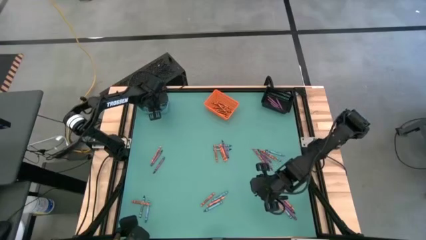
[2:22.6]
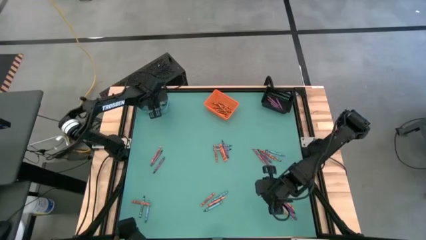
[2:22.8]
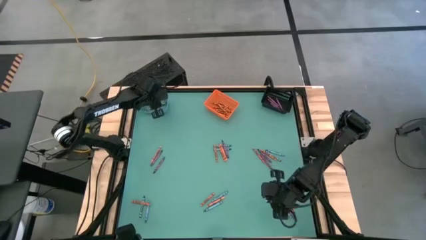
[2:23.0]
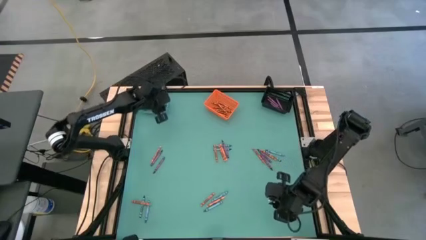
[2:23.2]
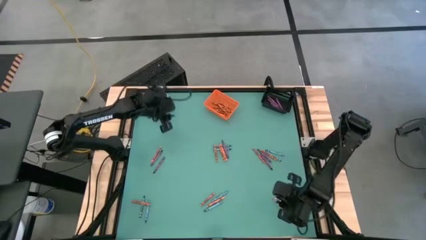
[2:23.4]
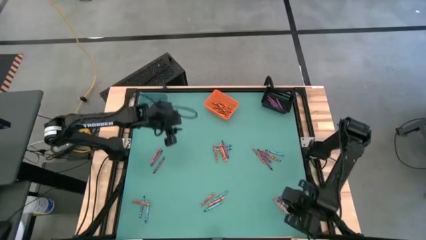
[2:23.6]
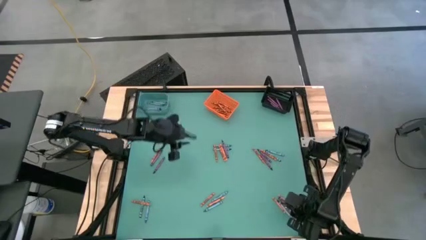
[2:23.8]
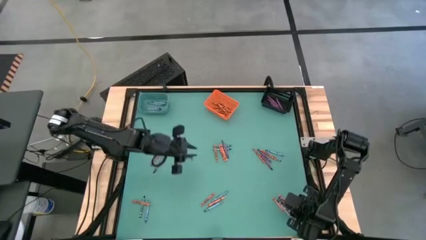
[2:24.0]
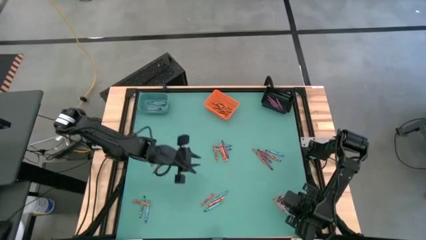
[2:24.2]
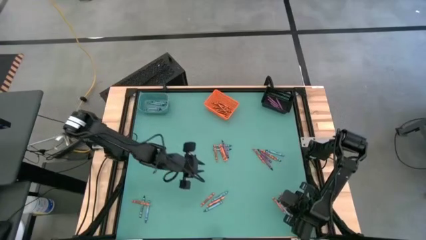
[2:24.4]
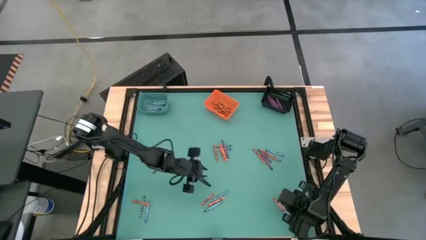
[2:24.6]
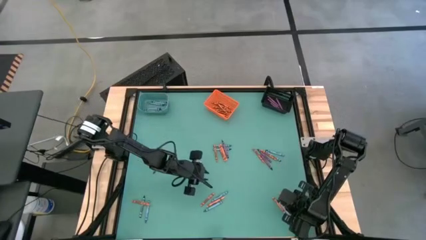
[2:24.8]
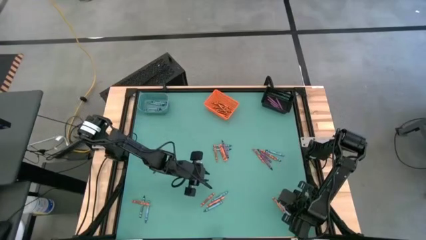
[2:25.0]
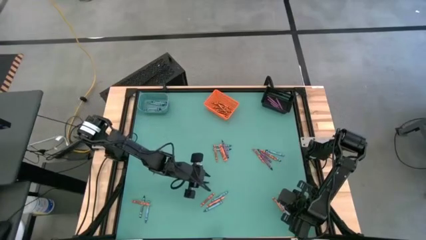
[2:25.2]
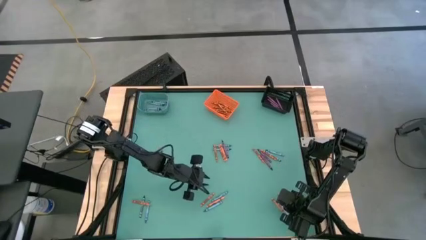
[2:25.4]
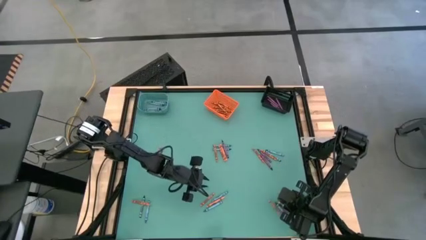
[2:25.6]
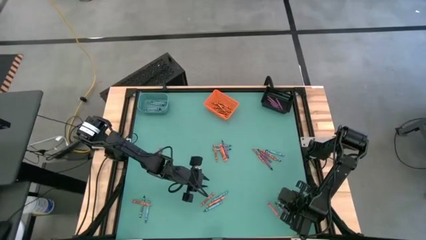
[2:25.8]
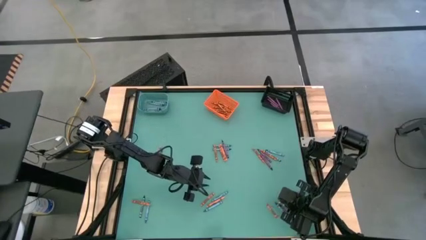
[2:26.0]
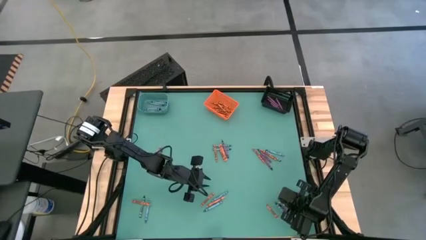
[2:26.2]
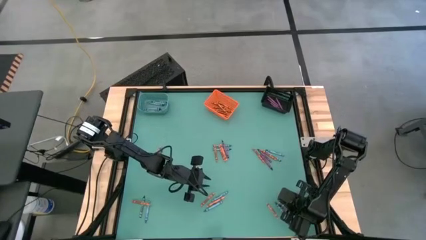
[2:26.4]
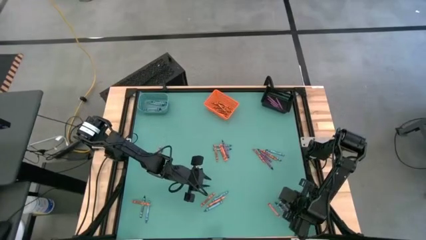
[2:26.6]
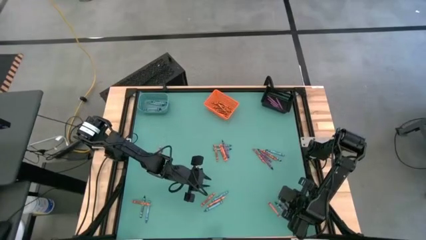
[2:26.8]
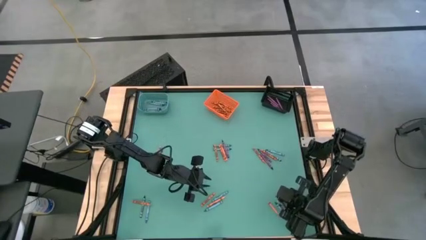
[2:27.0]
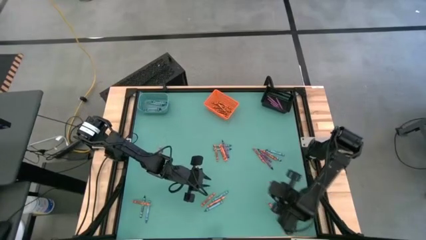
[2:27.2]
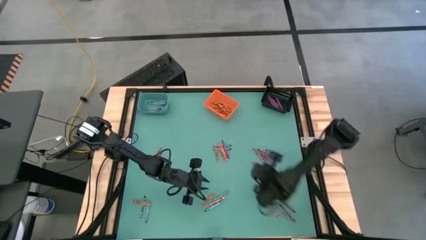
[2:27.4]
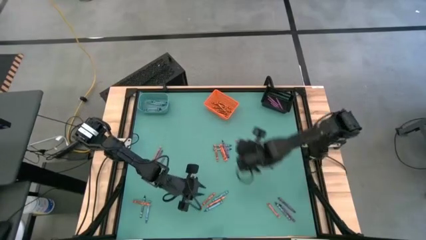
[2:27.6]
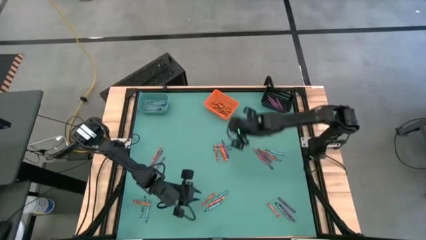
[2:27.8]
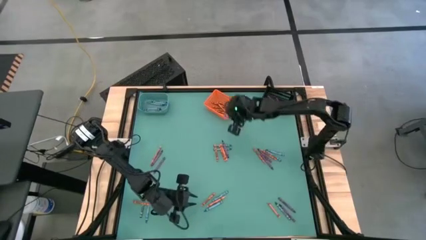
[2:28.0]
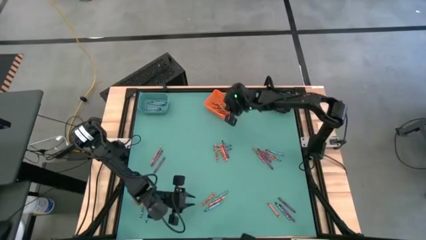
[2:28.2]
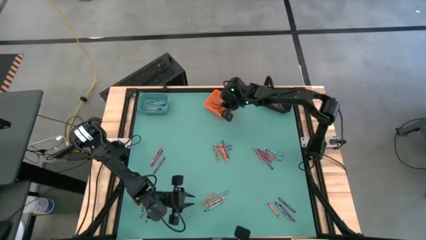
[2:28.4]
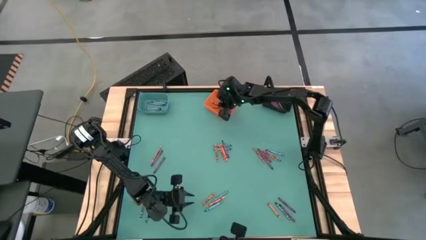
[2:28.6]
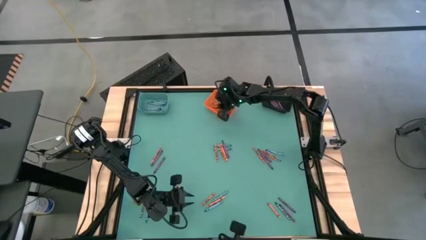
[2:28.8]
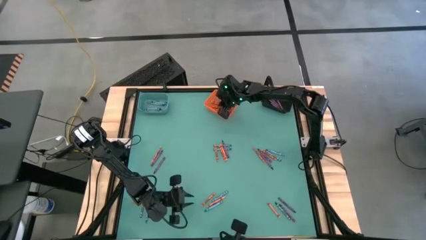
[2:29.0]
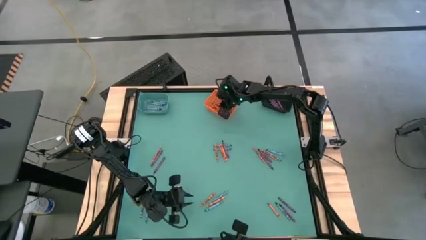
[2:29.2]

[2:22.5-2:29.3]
Task: Sort crayons
Put the orange crayon into the orange bin

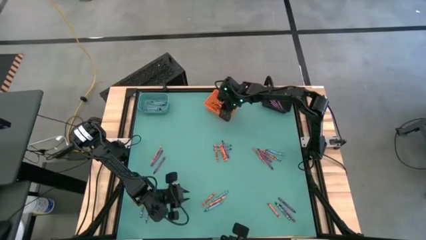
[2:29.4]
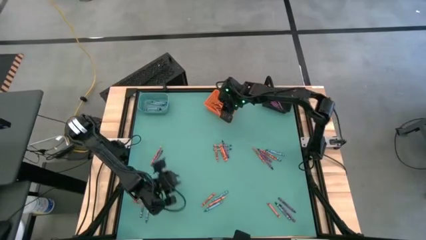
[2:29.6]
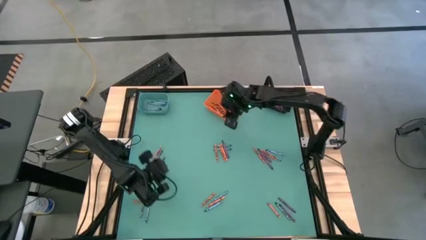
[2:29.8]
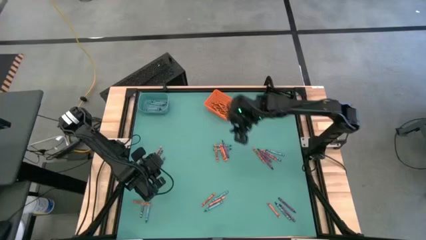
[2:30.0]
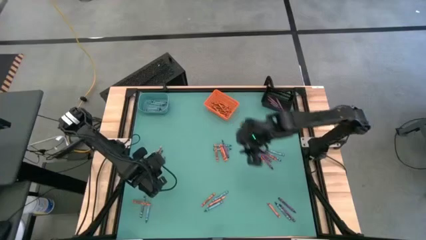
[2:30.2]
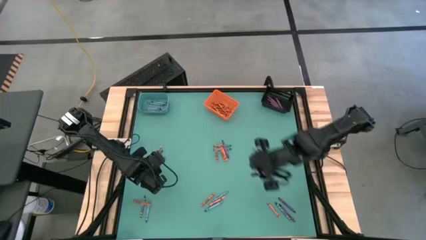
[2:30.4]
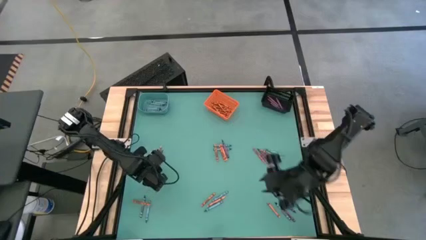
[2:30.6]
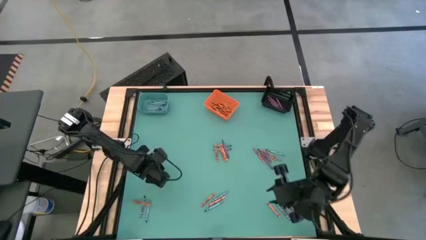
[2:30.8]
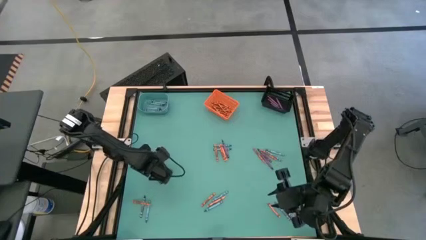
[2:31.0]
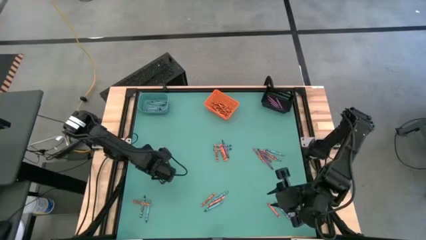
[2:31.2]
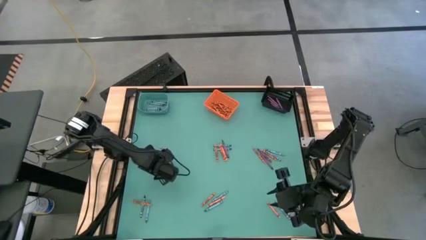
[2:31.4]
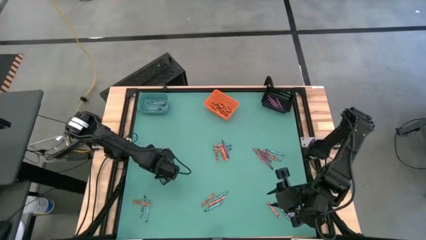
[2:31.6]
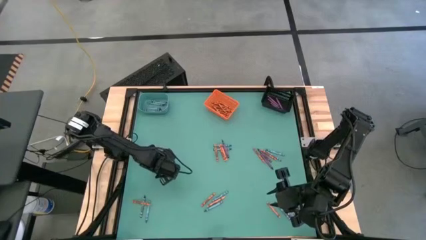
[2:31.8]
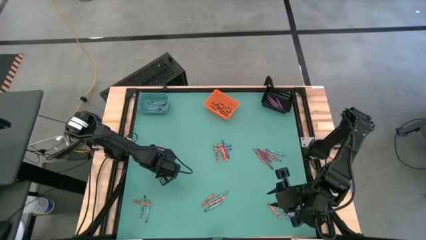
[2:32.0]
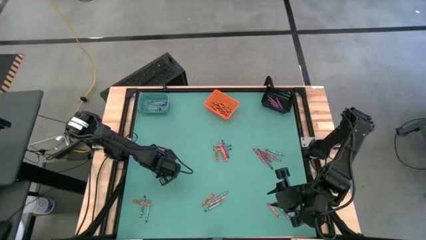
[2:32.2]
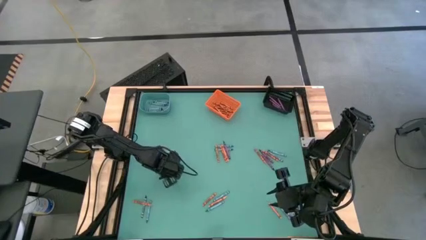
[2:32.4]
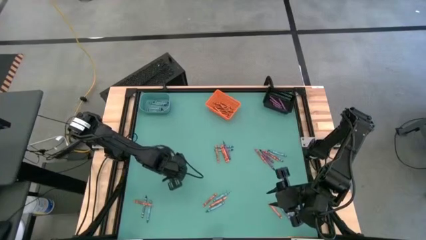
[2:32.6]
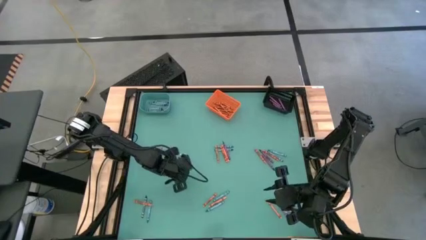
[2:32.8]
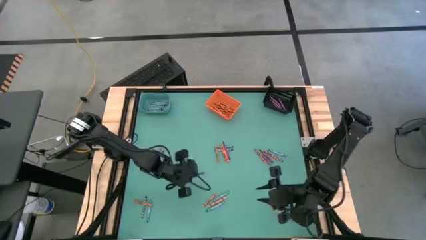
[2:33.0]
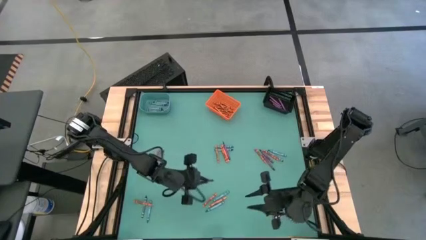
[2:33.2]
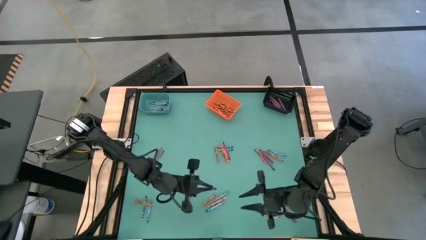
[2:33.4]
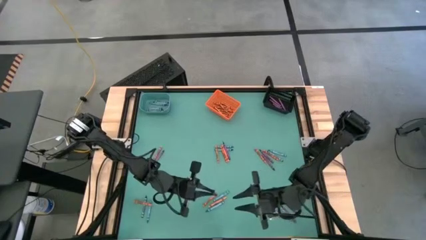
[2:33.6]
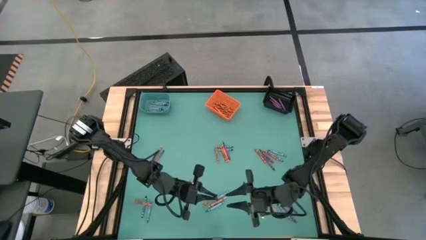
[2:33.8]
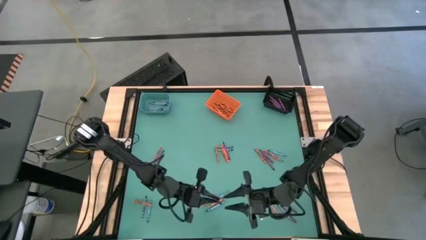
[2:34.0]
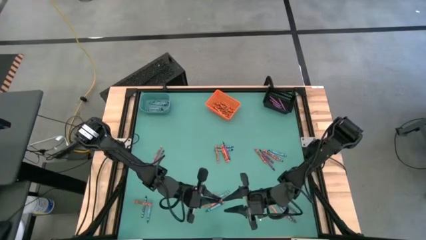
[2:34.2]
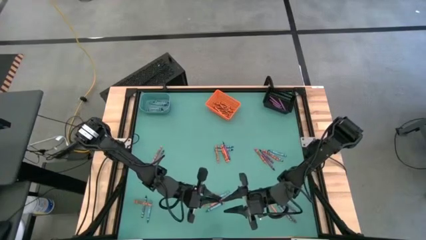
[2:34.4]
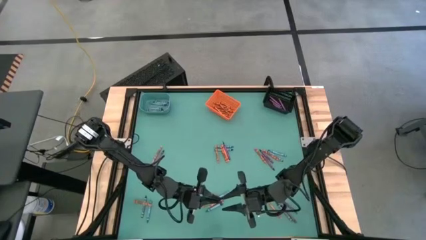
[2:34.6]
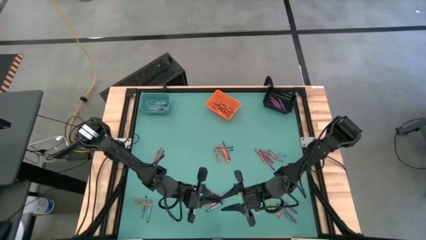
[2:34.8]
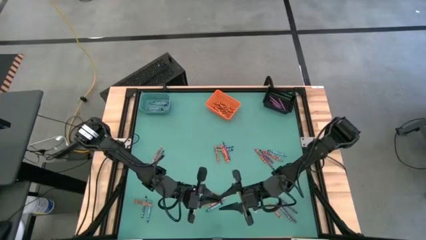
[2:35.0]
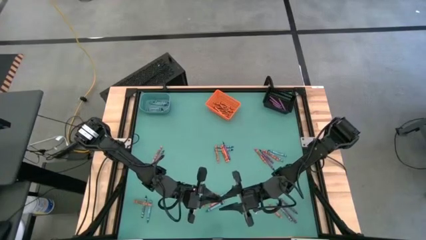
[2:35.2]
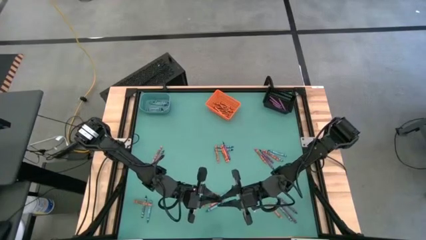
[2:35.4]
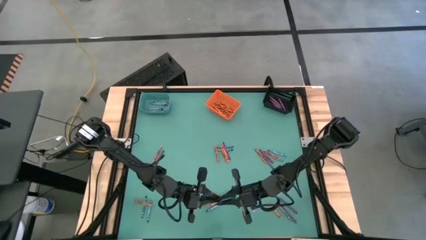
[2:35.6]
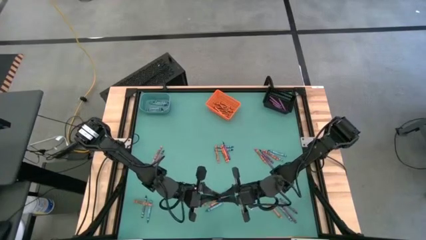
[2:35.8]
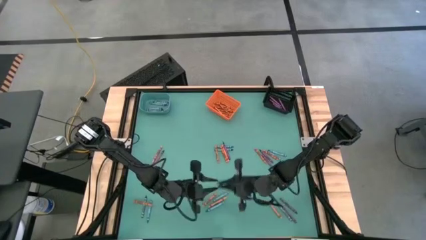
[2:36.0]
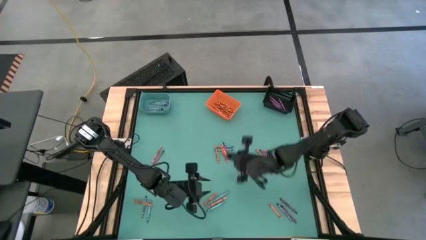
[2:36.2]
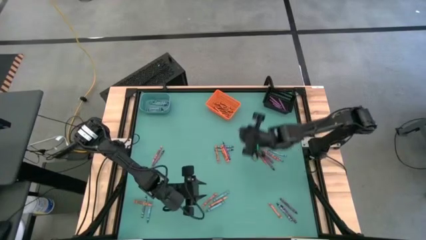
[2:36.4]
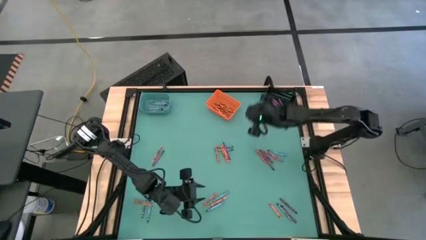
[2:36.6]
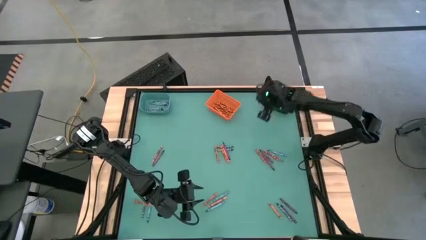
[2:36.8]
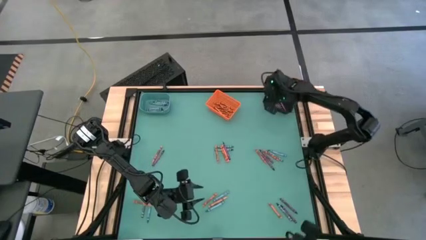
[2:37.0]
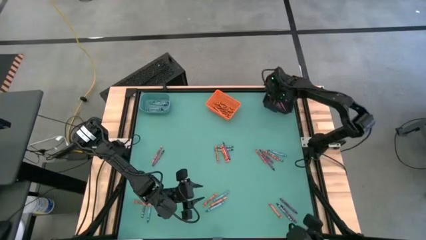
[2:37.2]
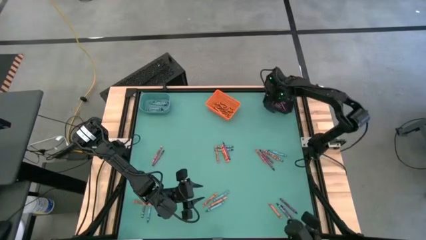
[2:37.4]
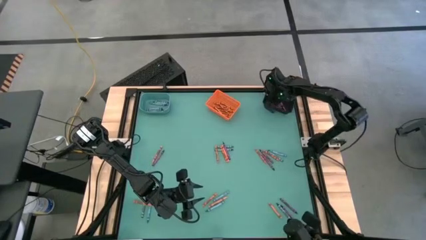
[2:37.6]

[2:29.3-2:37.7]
Put the violet crayon into the black bin

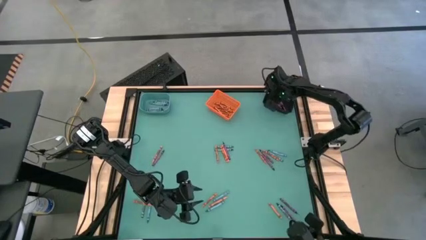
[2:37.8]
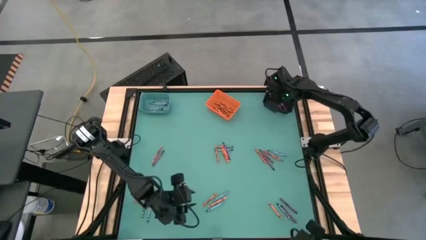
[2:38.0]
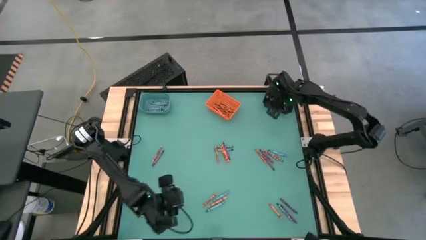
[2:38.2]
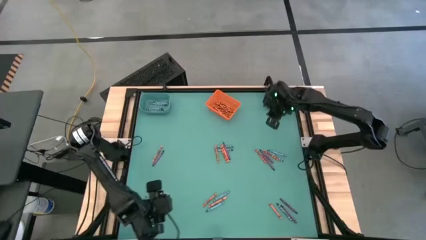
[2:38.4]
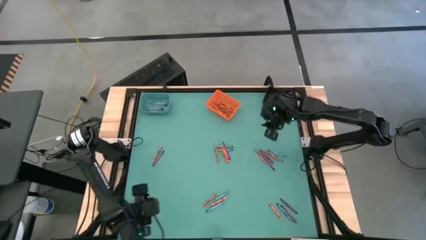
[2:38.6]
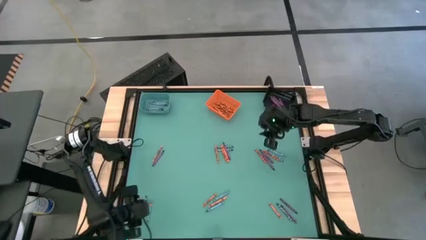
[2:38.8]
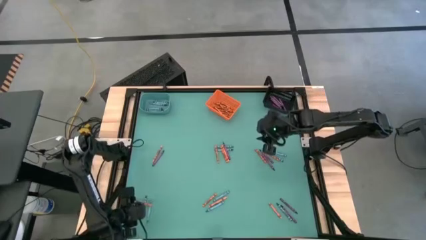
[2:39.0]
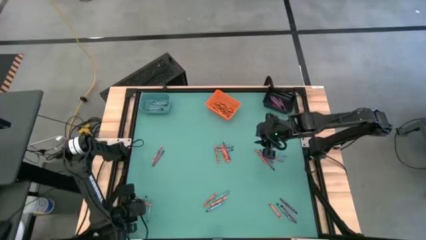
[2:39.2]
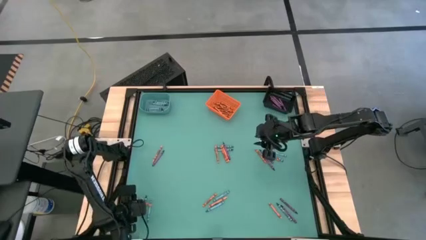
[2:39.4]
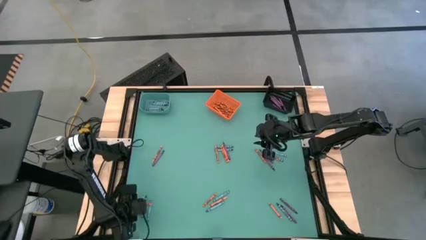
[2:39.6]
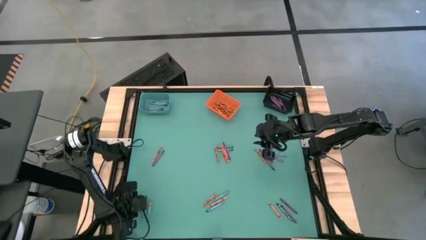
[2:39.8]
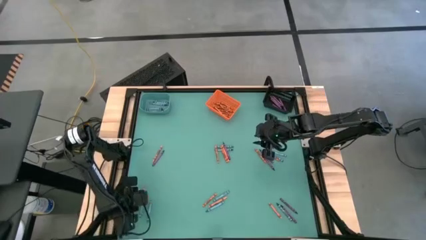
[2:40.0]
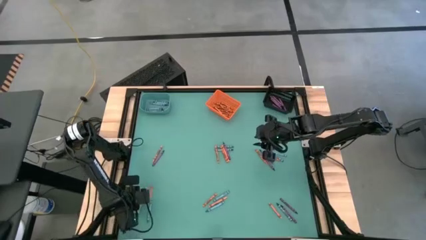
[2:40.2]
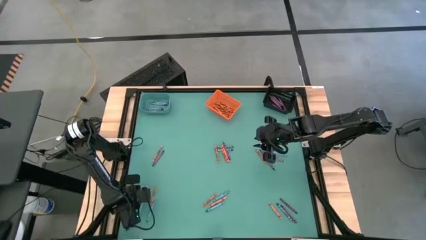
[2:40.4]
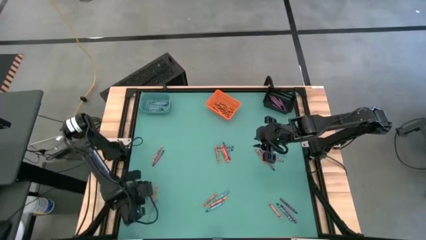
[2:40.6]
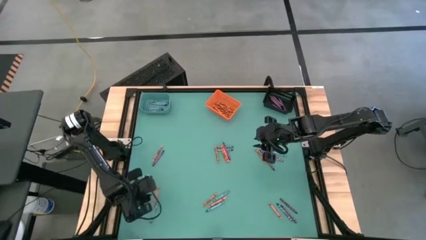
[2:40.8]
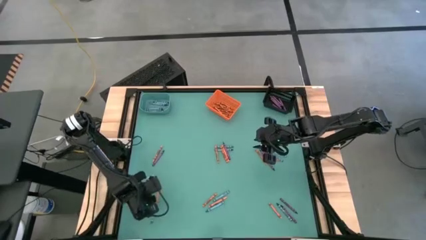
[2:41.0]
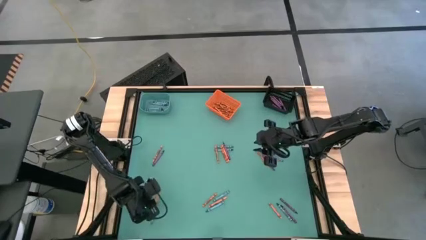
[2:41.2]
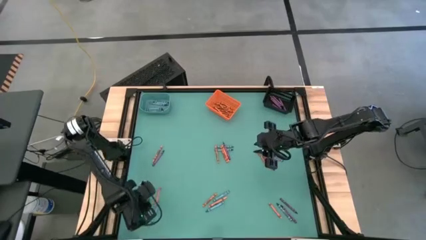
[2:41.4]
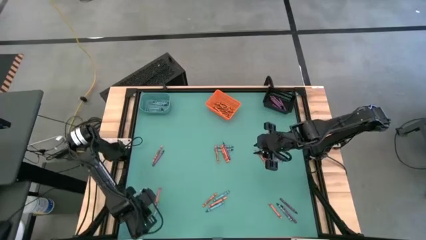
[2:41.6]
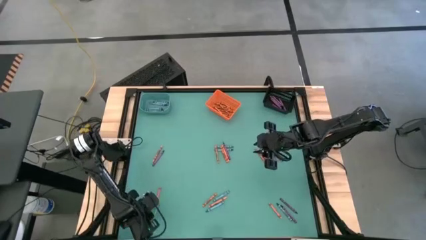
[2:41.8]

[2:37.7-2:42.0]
Put the blue crayon into the blue bin
